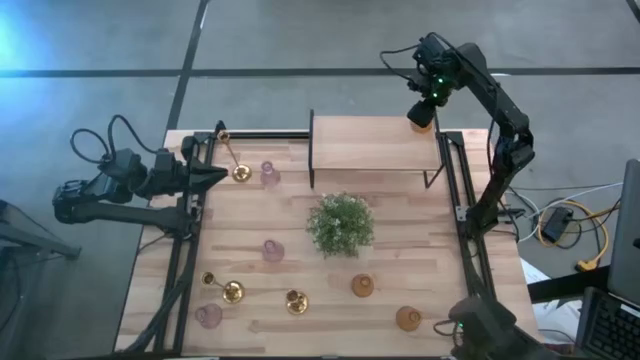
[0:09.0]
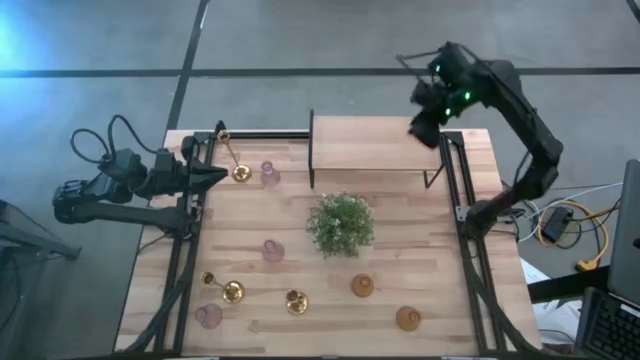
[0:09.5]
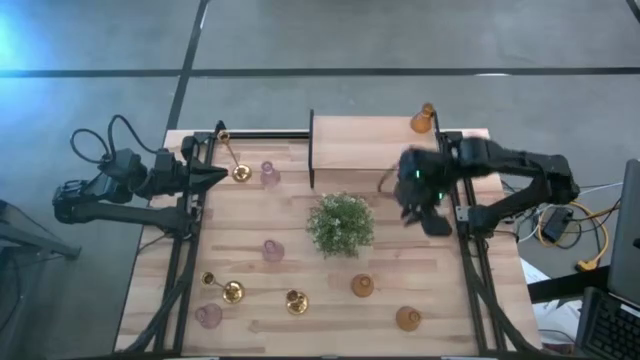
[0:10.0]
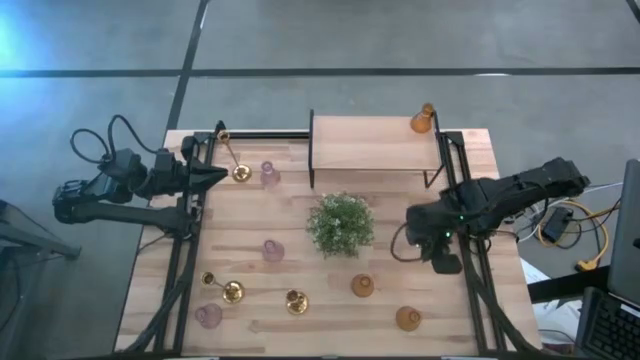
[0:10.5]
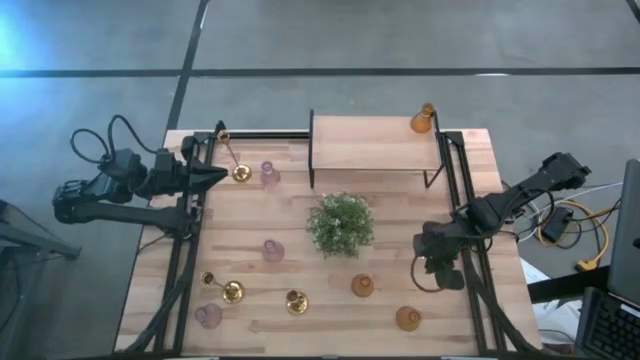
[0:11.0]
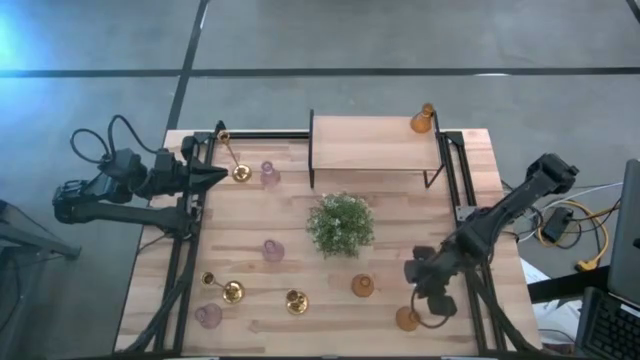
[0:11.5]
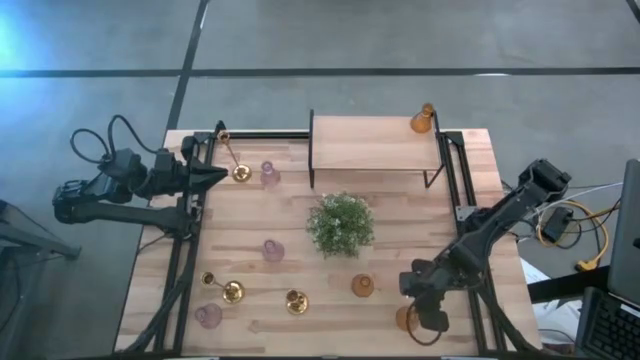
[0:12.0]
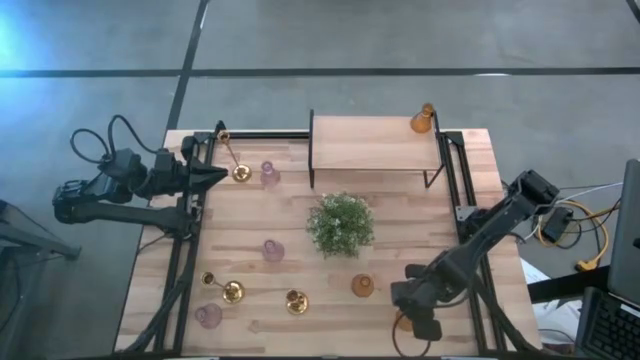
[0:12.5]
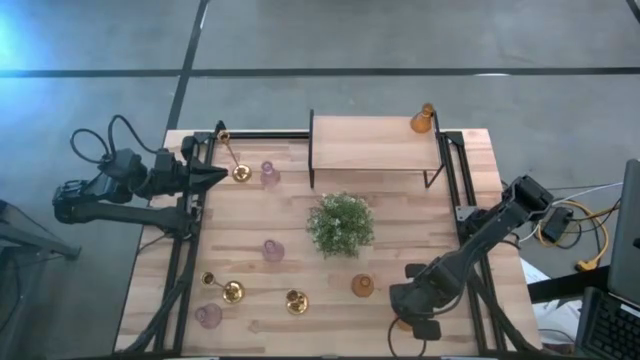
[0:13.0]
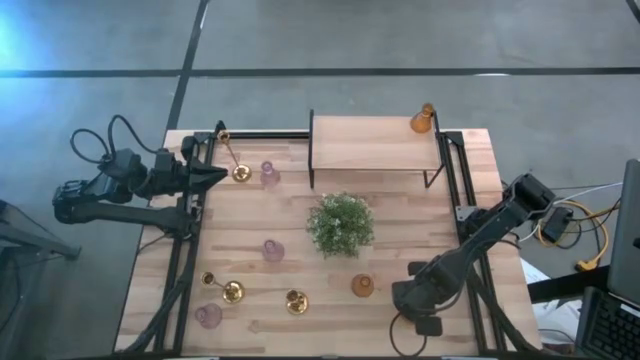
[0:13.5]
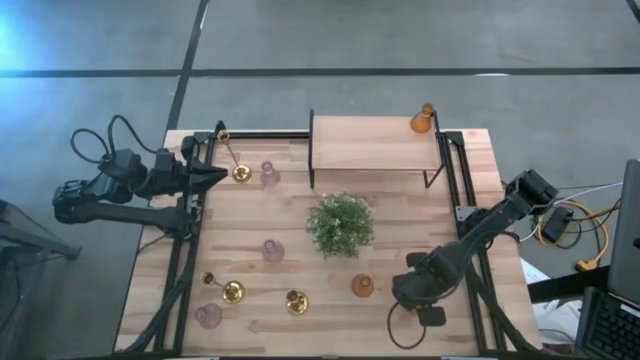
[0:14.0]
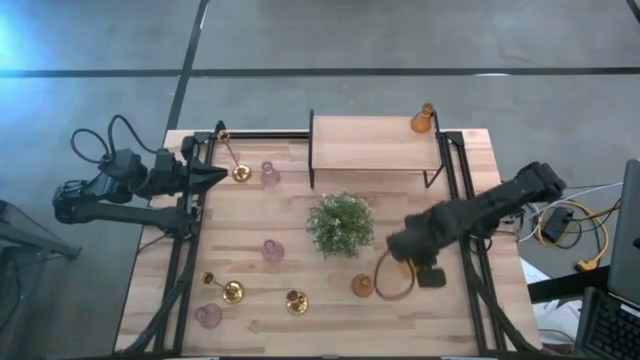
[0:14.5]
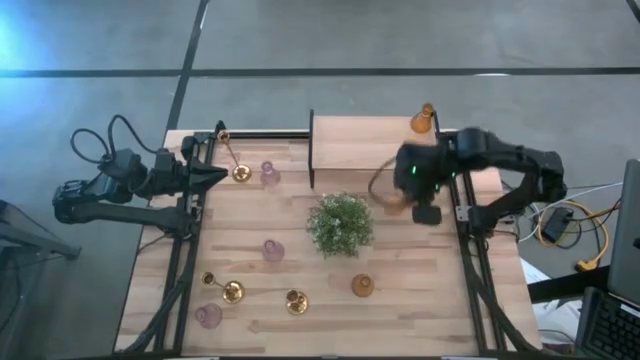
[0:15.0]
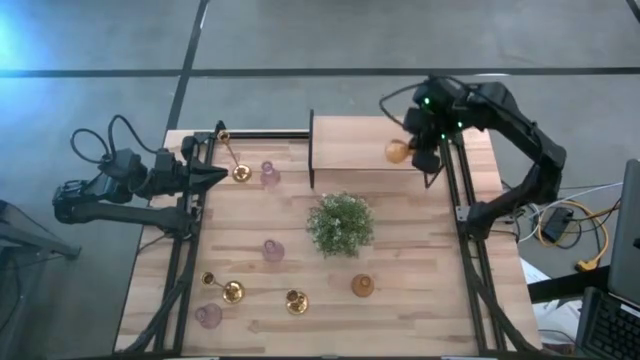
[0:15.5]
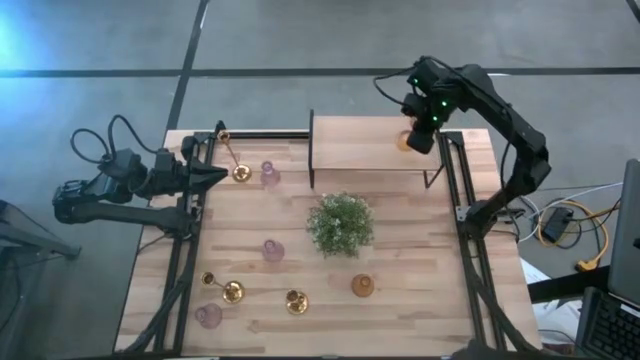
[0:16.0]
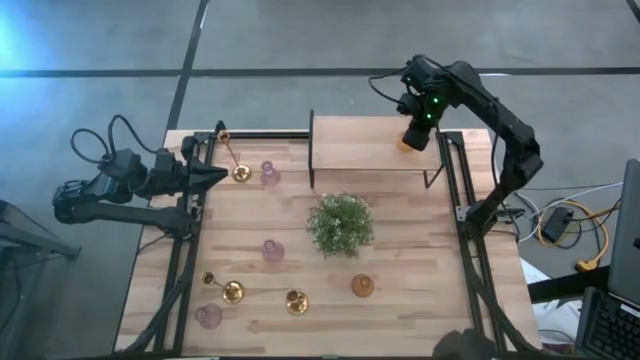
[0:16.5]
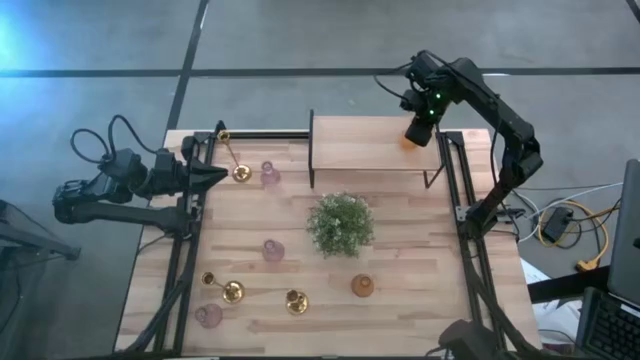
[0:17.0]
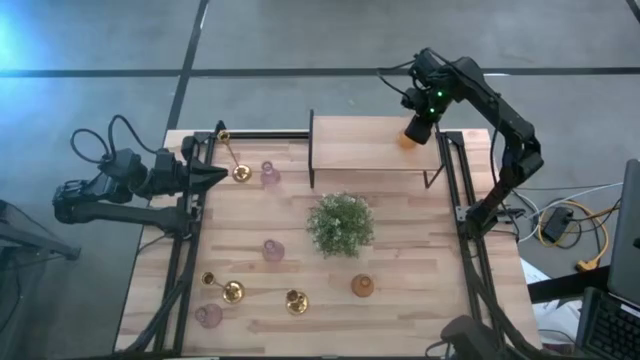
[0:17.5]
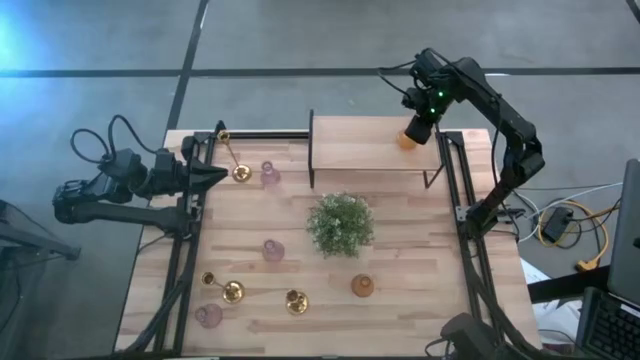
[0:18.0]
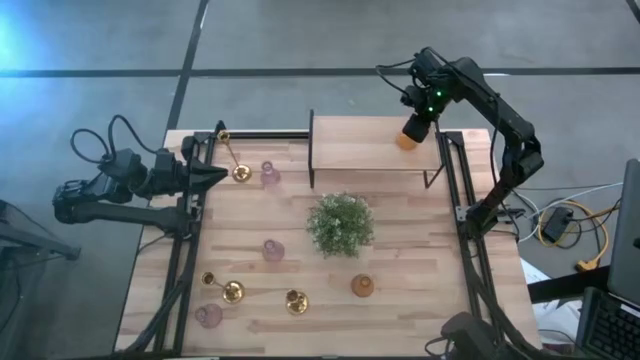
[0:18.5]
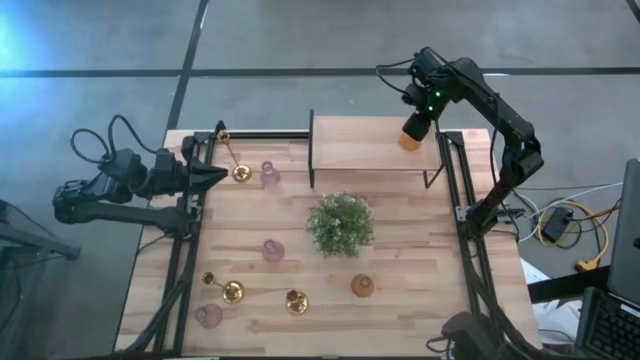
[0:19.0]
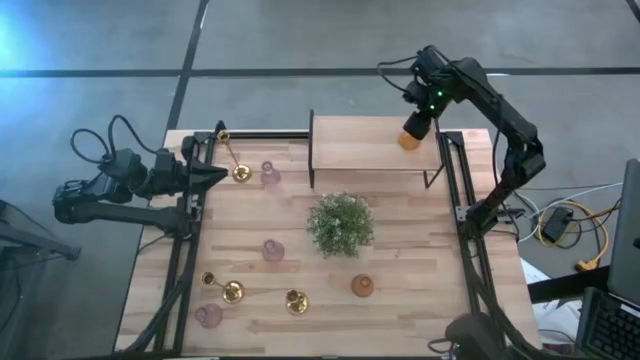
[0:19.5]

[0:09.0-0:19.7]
Task: Pick & Place candle stick holders
Put the bottom orange candle holder on the shelf

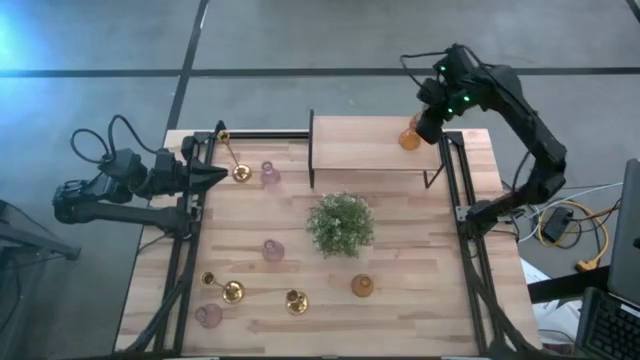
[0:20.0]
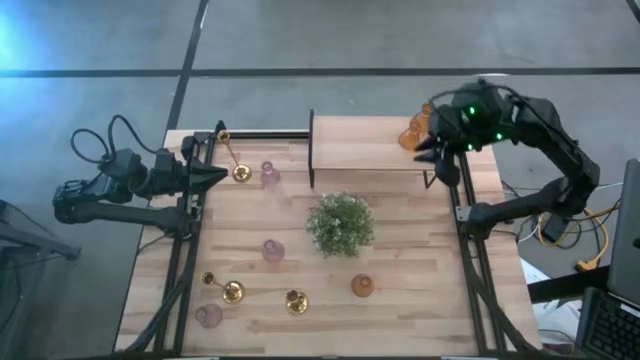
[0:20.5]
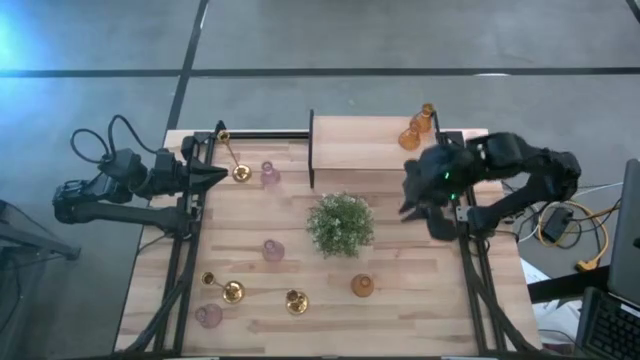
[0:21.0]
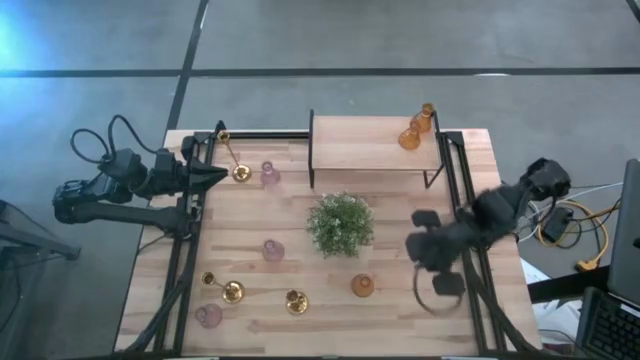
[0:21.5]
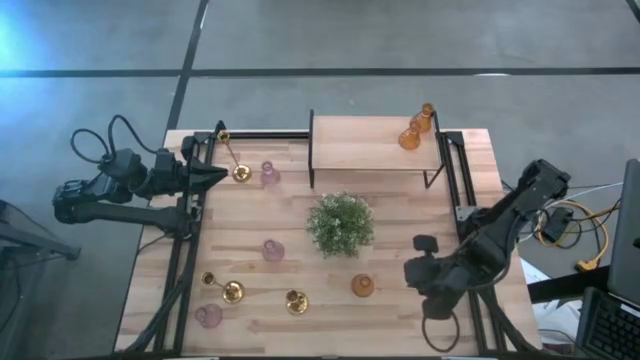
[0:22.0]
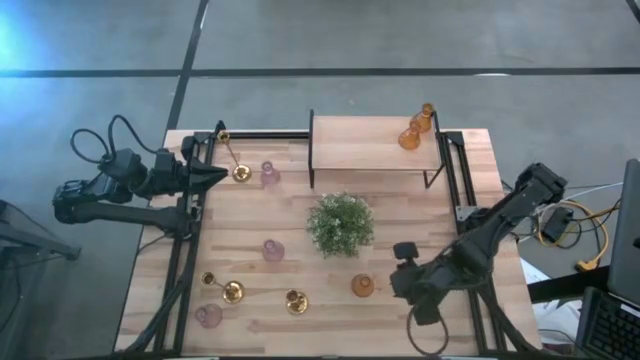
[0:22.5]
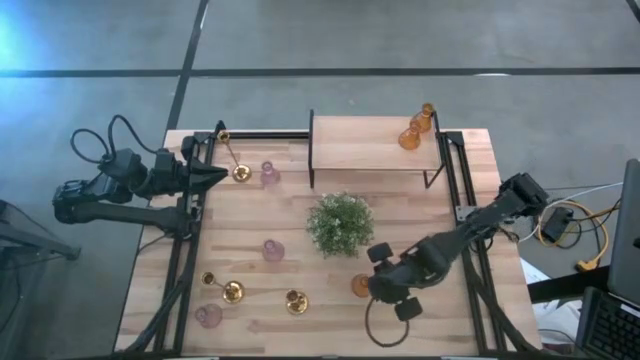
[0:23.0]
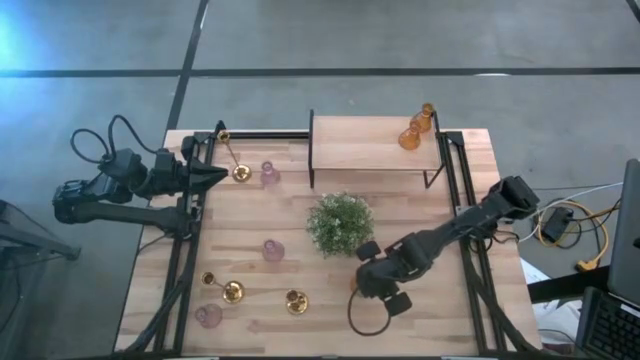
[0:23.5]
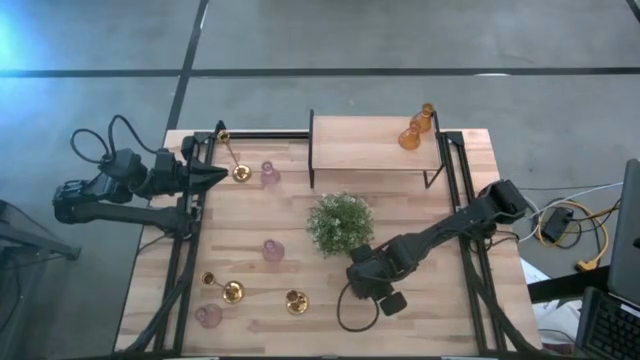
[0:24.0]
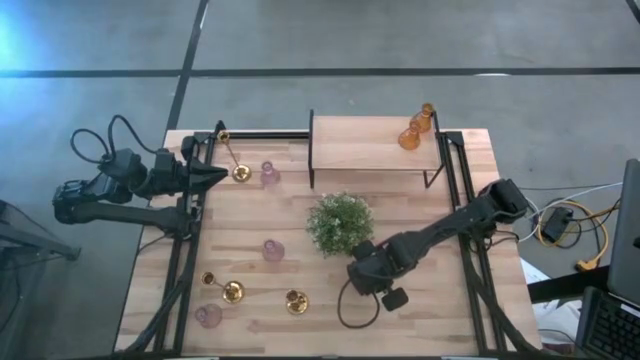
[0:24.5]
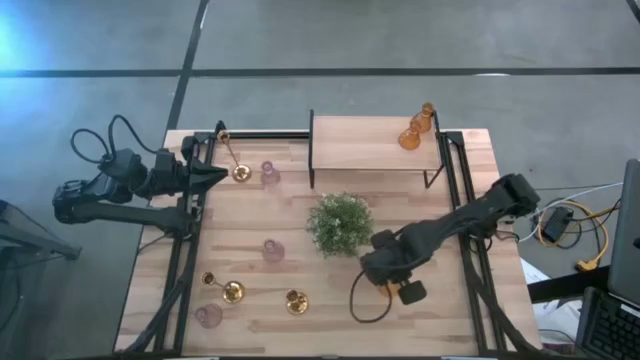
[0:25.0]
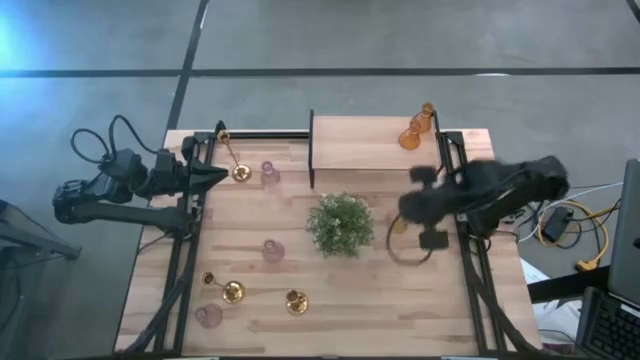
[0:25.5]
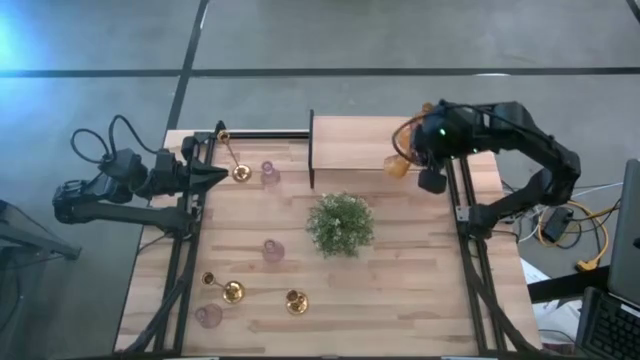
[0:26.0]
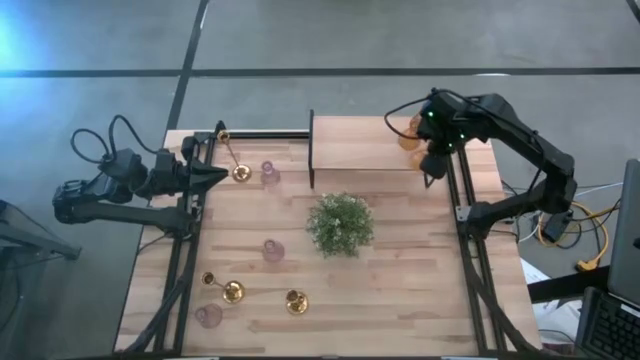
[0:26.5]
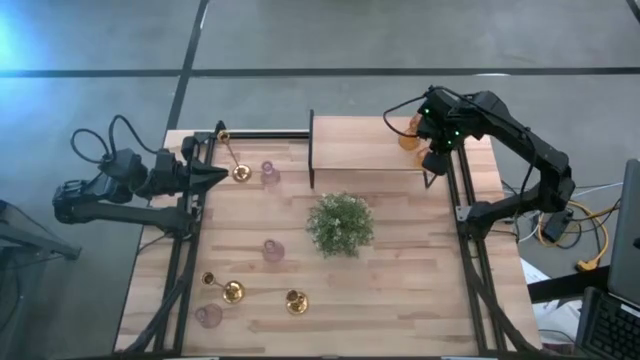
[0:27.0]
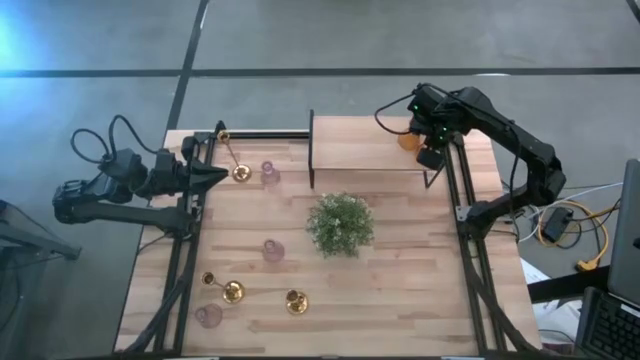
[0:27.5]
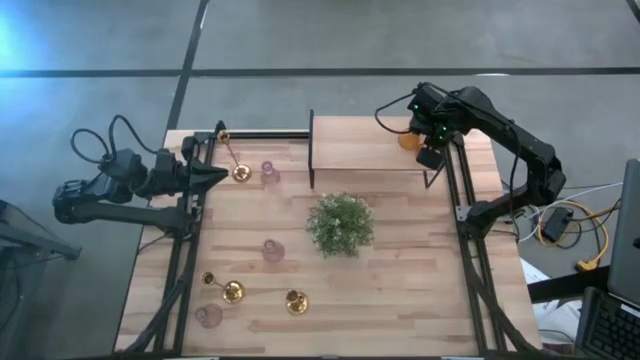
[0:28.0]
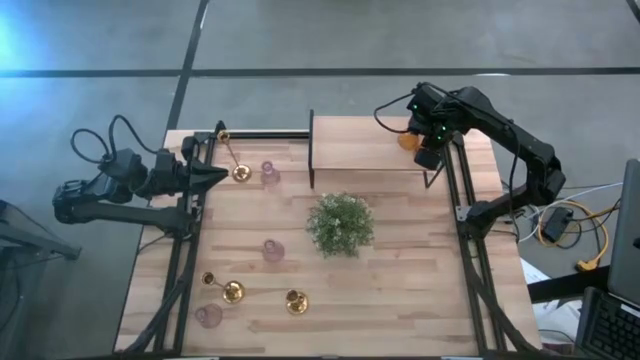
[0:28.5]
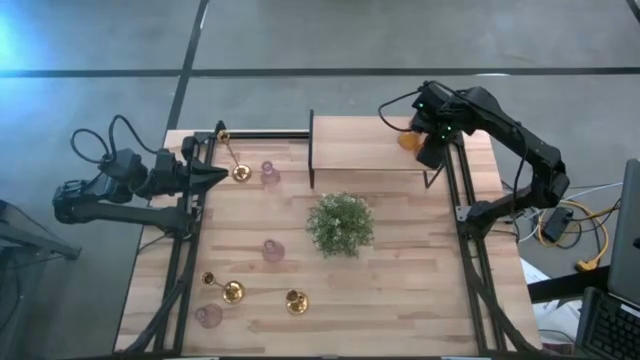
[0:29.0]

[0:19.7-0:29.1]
Put the orange candle holder on the shelf
